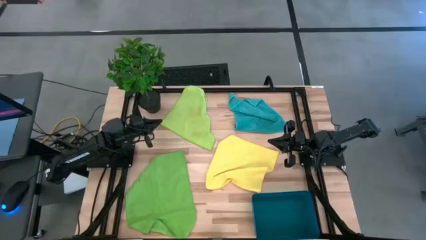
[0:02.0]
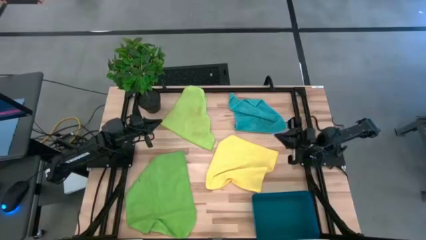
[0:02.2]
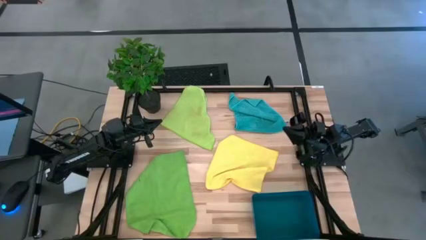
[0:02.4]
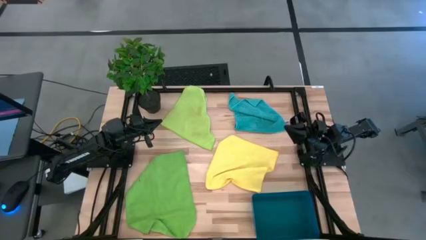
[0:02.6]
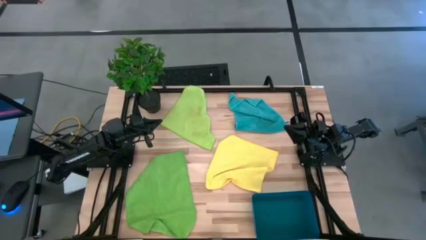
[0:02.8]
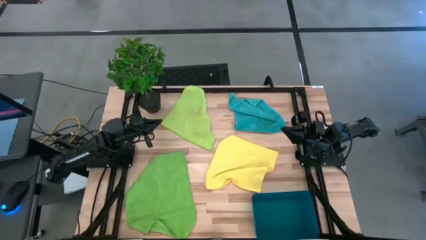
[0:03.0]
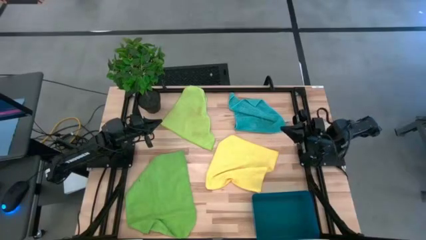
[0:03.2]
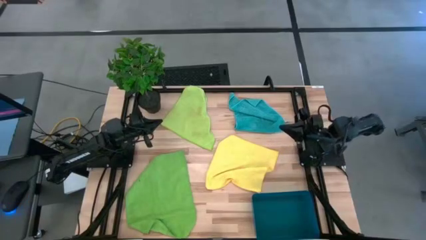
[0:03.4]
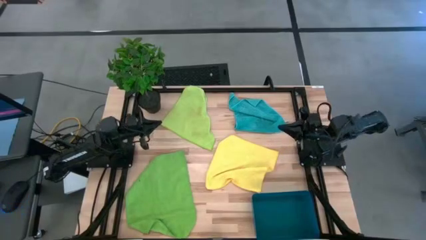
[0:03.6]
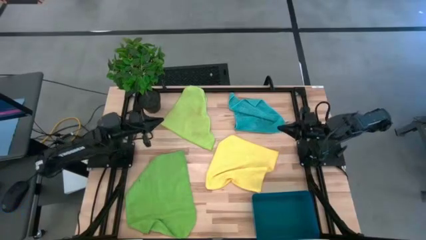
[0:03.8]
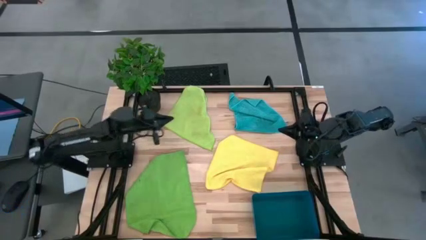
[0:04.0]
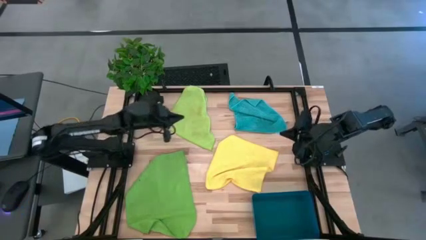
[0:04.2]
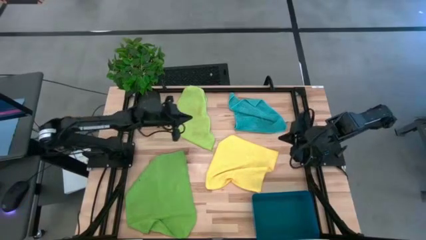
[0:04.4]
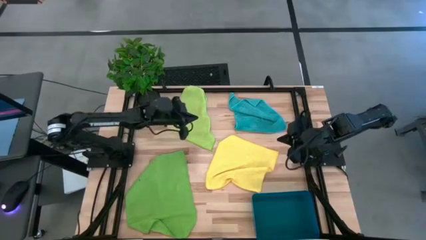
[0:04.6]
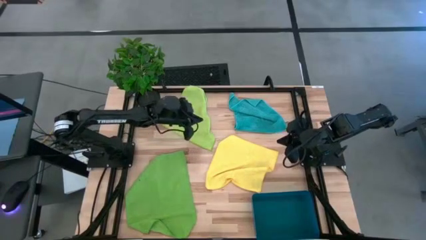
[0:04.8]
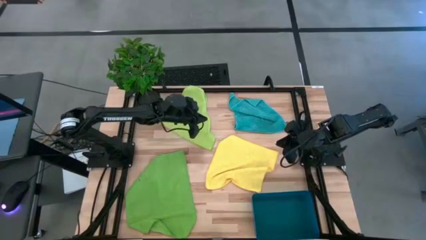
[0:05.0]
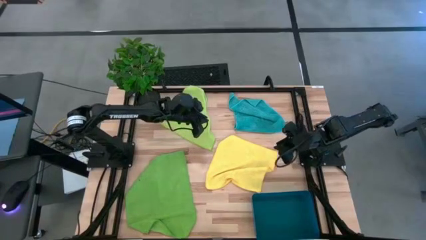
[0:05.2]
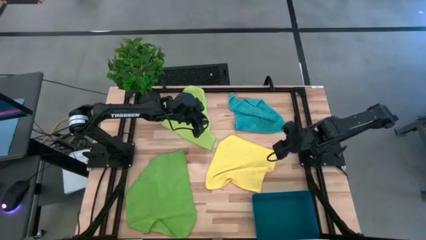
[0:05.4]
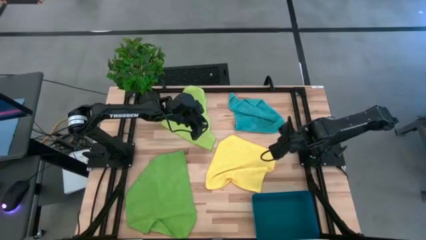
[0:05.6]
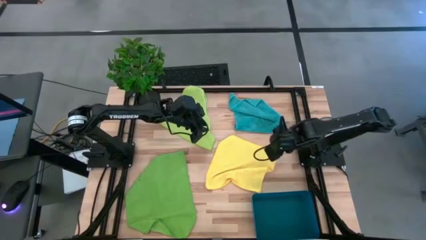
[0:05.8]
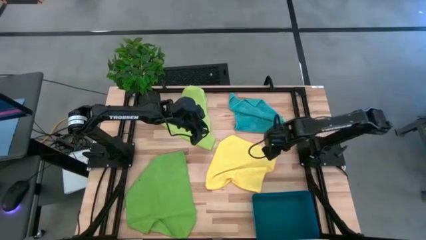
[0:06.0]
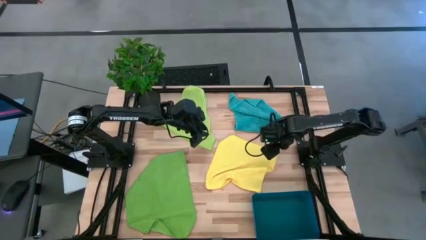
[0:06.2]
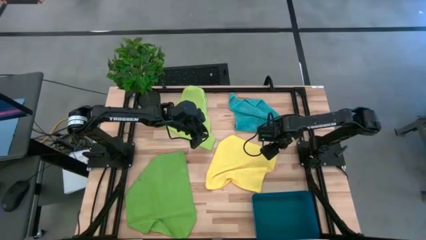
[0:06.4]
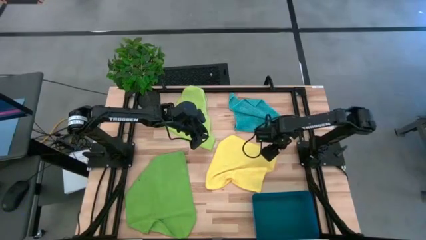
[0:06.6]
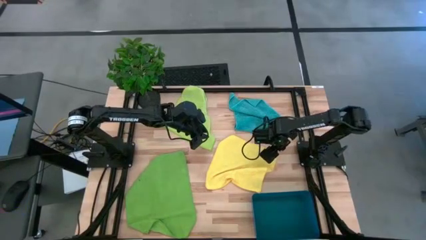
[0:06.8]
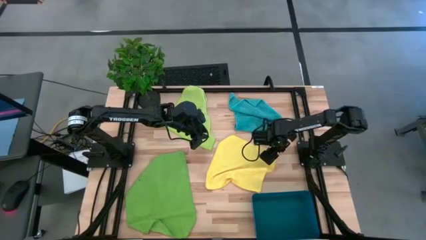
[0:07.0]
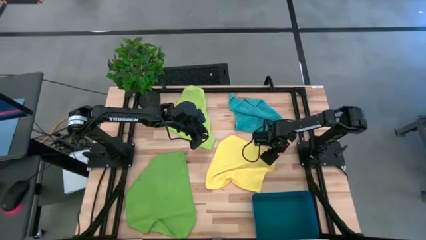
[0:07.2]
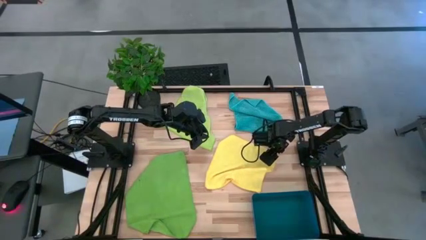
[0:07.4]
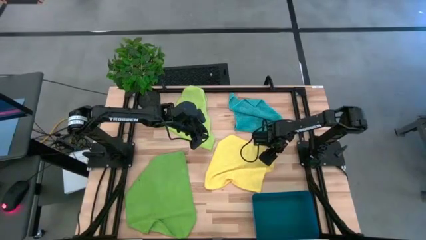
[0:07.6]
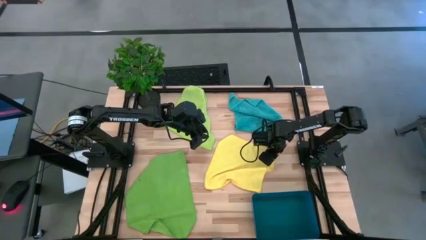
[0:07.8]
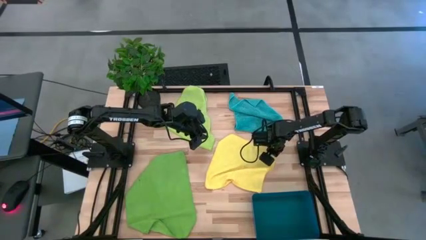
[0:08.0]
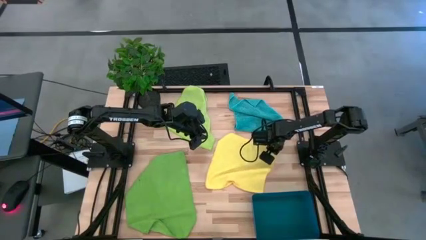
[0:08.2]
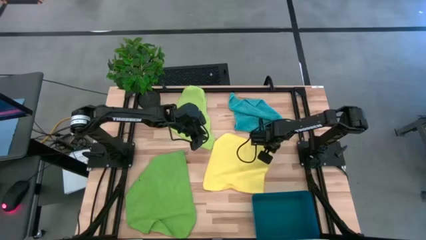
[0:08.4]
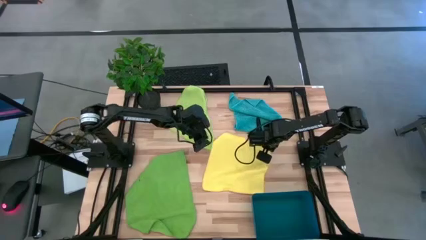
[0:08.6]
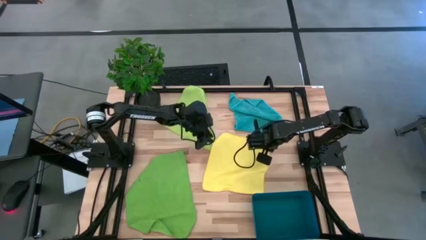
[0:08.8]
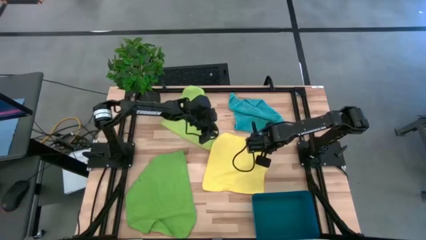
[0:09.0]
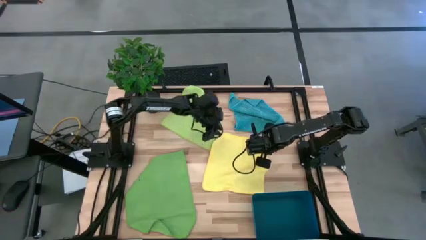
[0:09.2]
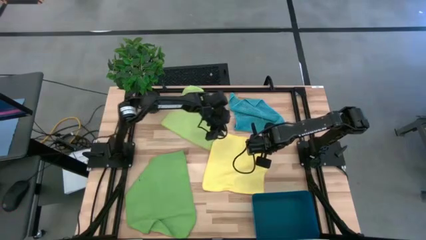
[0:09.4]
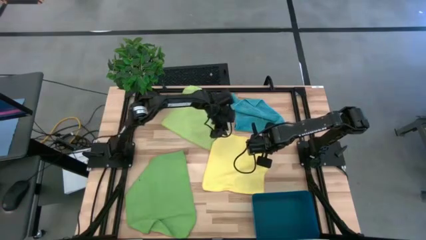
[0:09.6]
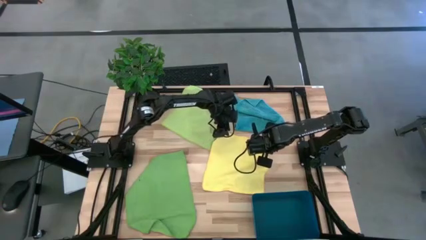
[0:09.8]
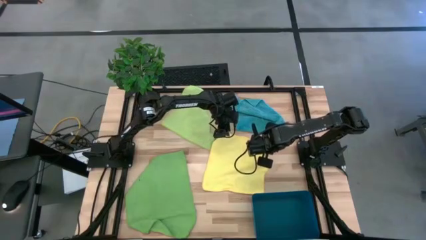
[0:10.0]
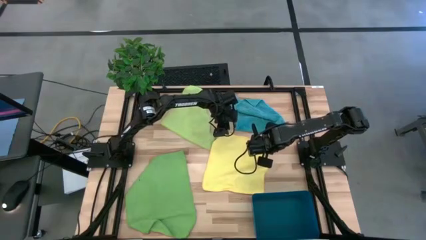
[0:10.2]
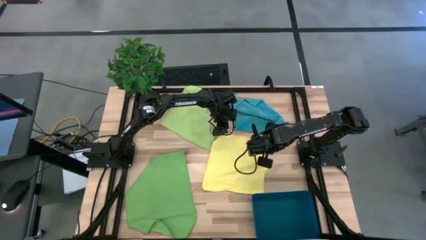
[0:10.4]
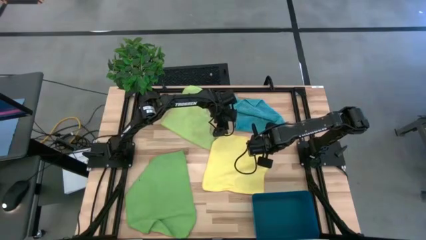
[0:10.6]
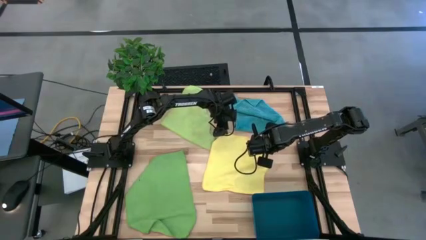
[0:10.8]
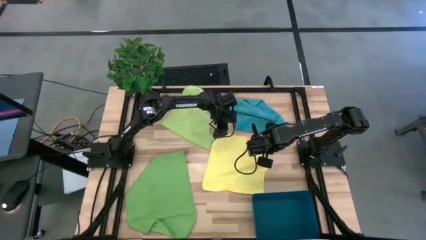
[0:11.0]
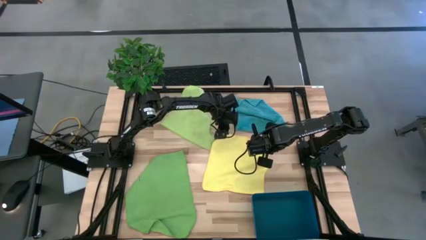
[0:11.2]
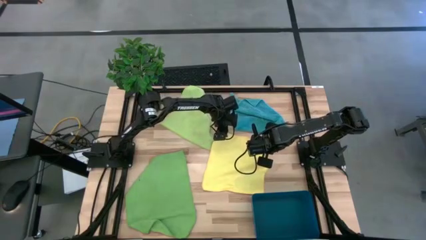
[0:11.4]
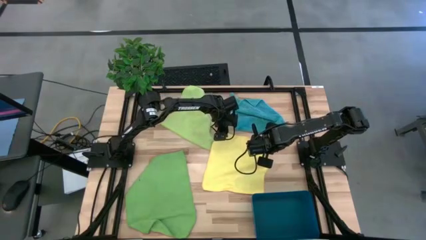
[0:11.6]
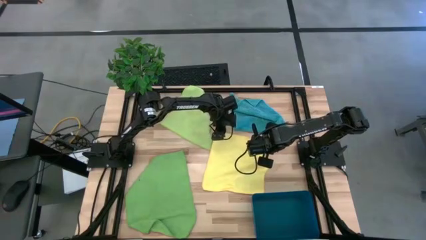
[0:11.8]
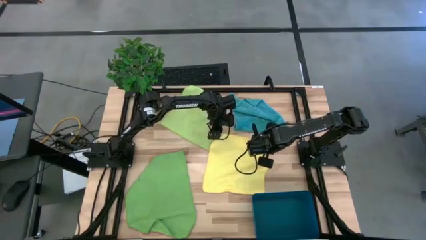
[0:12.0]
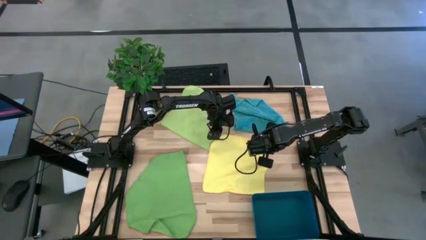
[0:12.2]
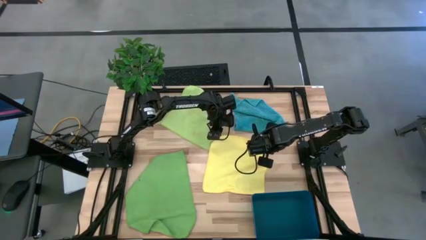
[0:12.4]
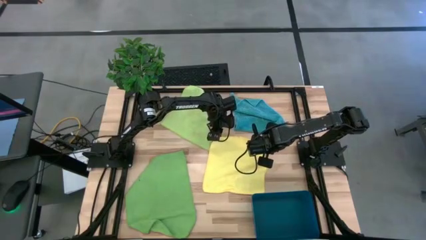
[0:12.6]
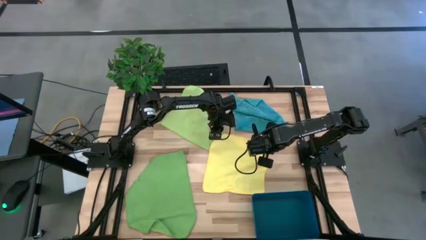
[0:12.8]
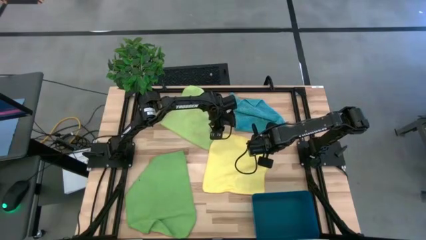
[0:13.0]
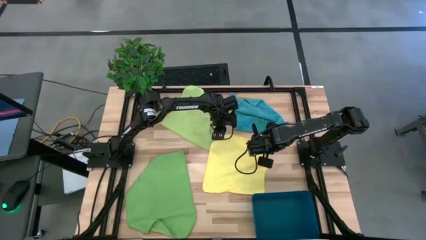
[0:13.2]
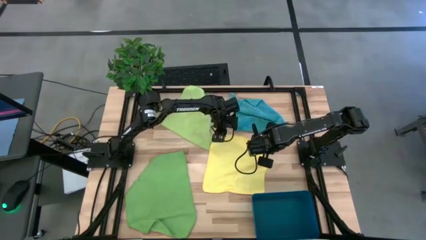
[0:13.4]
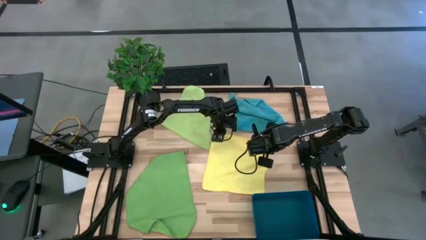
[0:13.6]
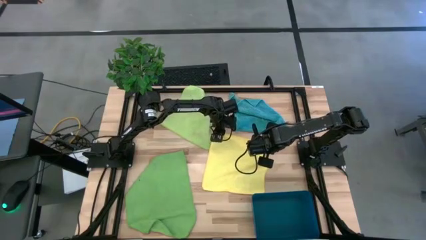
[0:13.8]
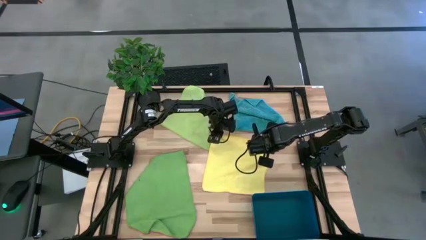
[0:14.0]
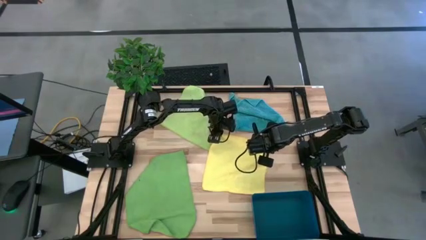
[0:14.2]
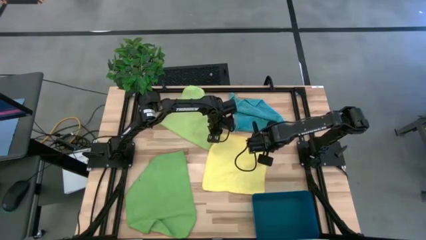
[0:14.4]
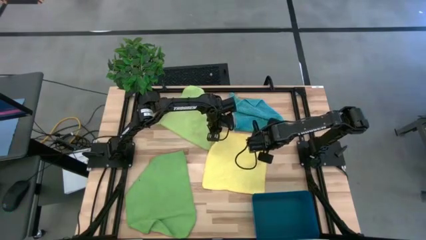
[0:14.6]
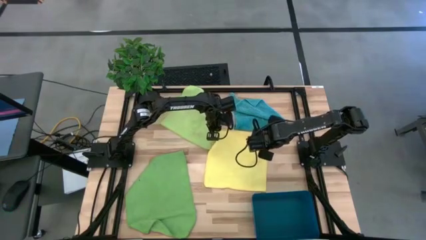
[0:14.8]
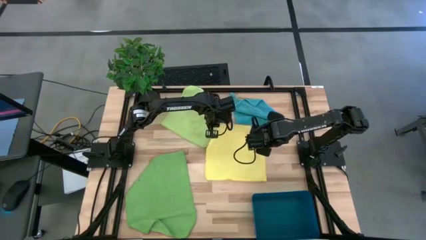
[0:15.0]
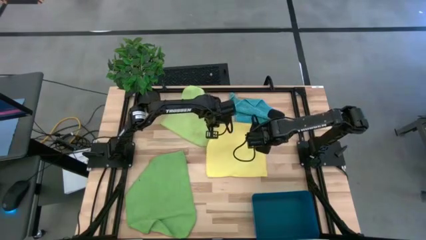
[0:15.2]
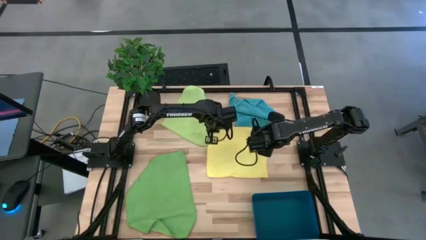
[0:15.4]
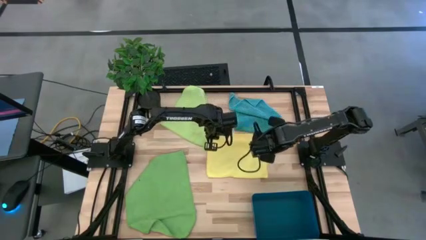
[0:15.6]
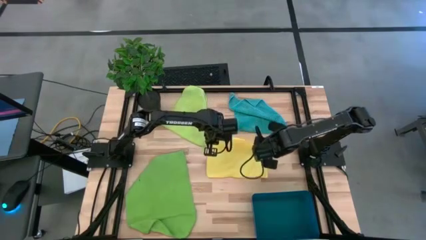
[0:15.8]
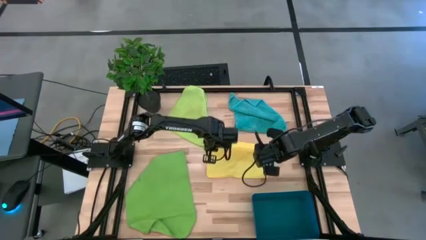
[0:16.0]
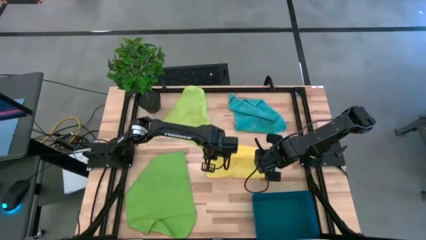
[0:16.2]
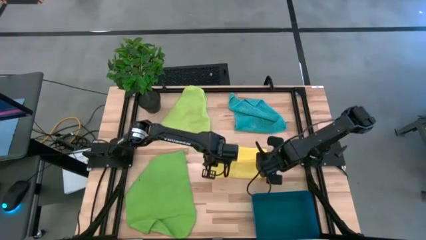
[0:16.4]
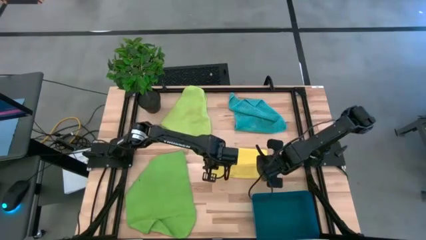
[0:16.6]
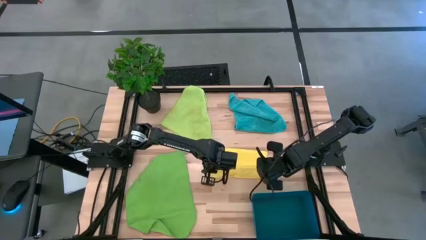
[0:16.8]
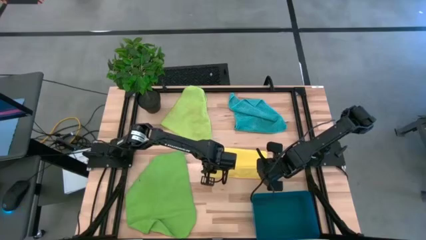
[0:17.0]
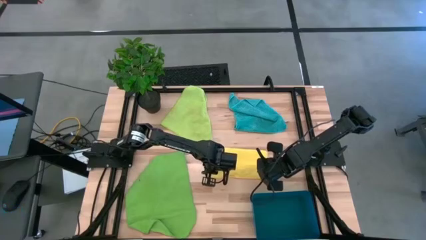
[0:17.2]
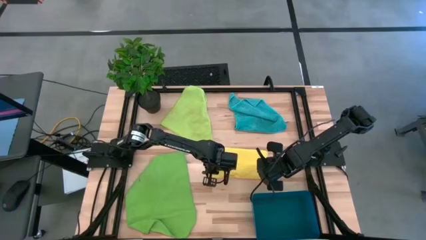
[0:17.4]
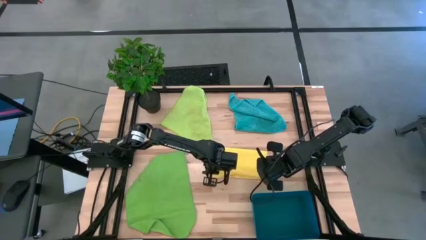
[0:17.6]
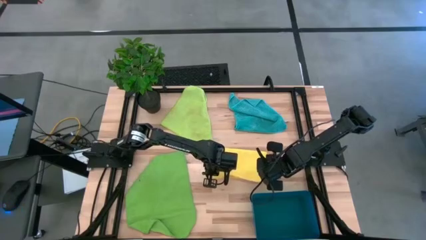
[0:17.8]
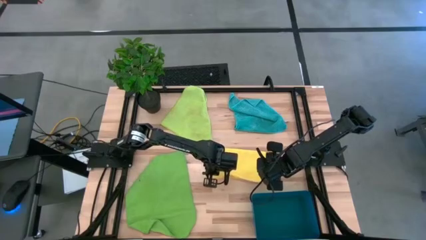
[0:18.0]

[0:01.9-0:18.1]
Task: Fold microfiber towels
Fold the yellow towel
